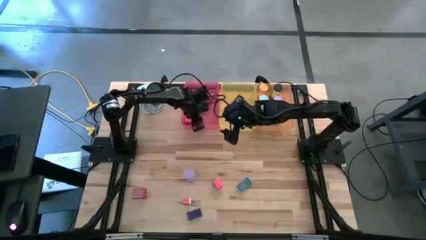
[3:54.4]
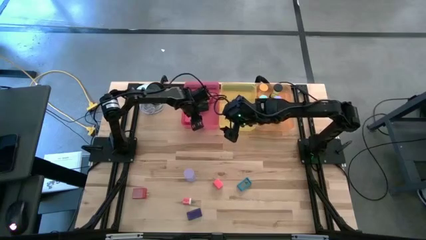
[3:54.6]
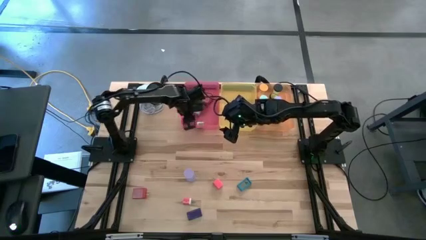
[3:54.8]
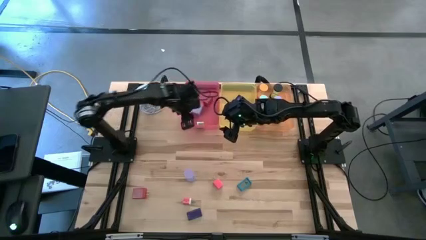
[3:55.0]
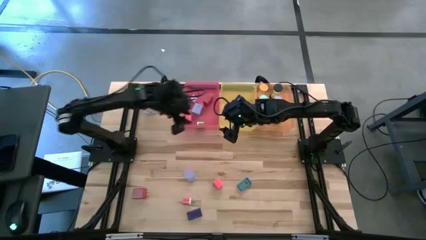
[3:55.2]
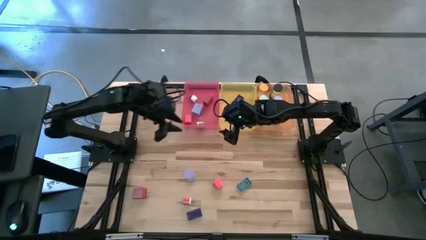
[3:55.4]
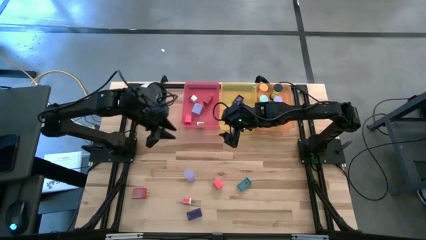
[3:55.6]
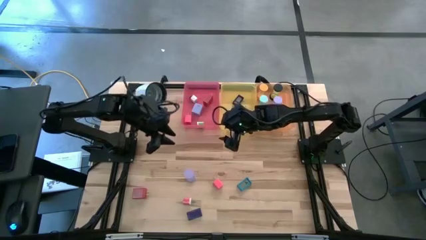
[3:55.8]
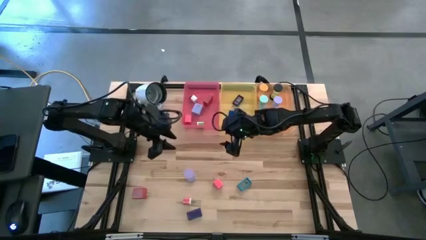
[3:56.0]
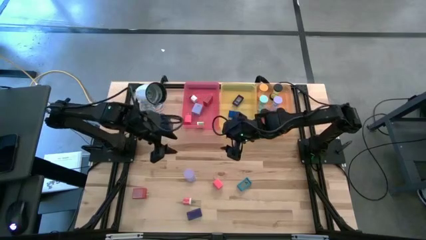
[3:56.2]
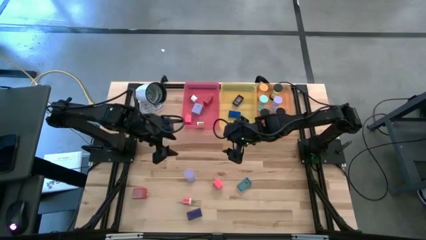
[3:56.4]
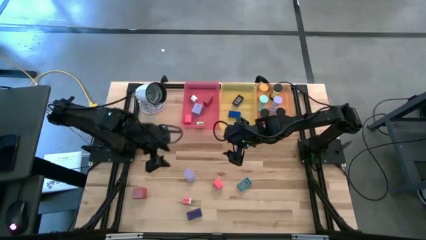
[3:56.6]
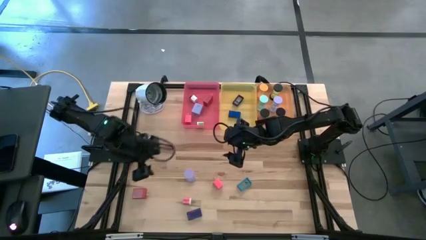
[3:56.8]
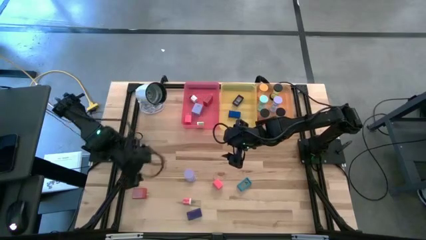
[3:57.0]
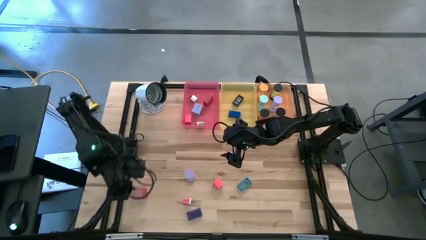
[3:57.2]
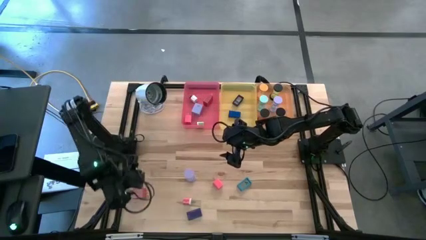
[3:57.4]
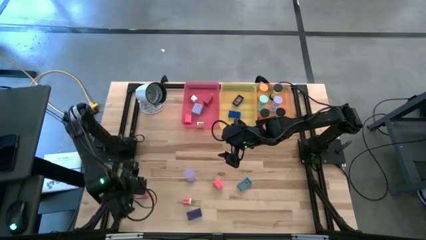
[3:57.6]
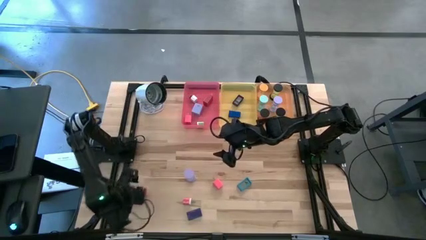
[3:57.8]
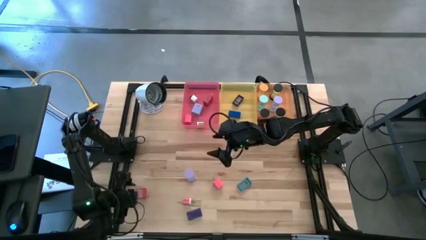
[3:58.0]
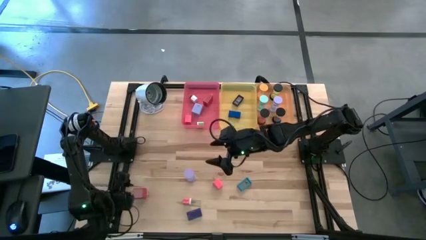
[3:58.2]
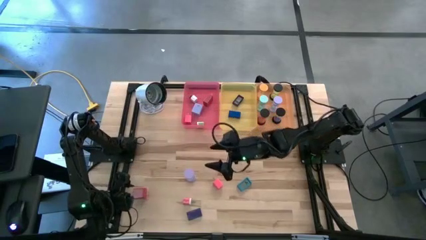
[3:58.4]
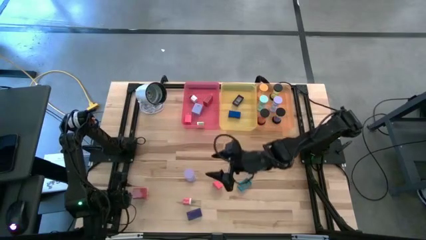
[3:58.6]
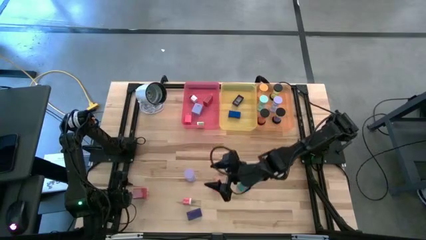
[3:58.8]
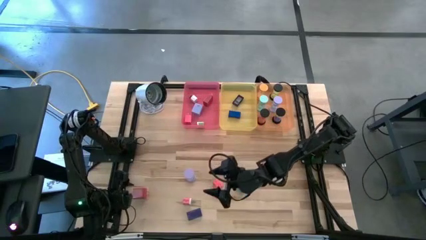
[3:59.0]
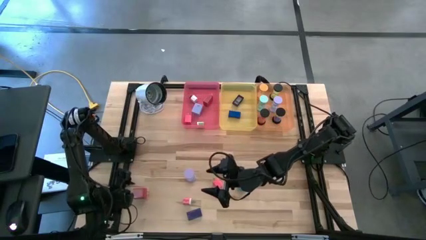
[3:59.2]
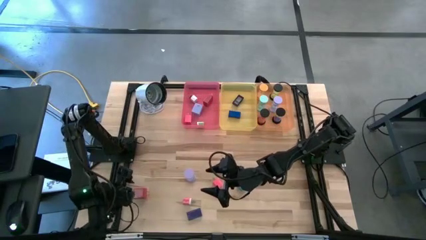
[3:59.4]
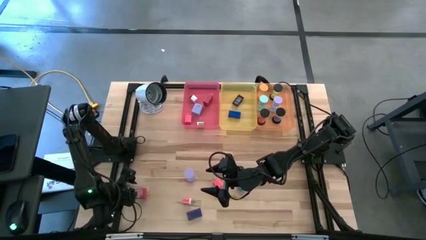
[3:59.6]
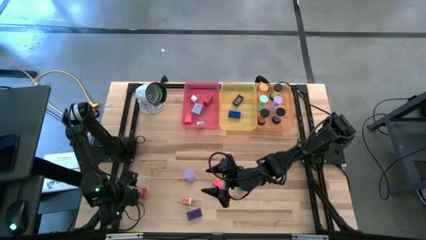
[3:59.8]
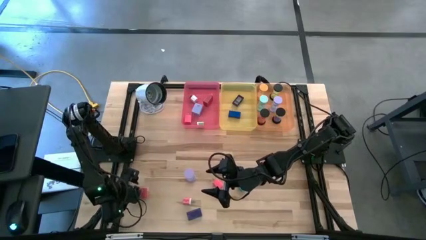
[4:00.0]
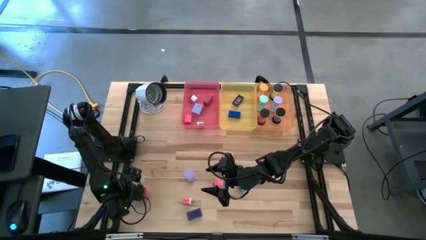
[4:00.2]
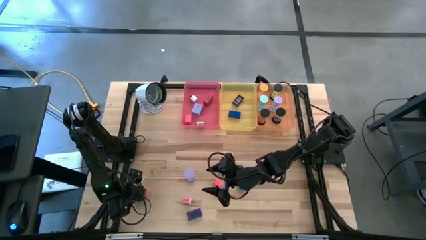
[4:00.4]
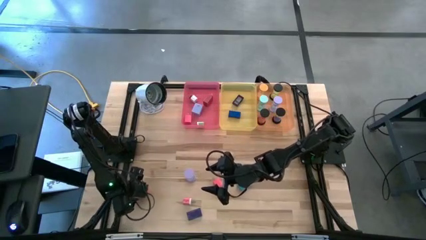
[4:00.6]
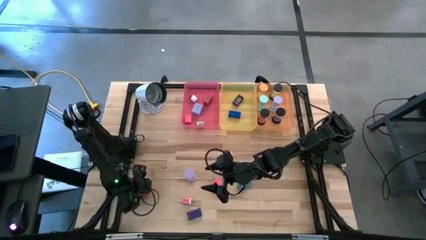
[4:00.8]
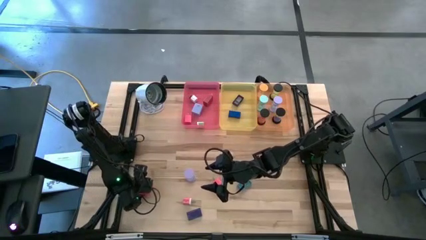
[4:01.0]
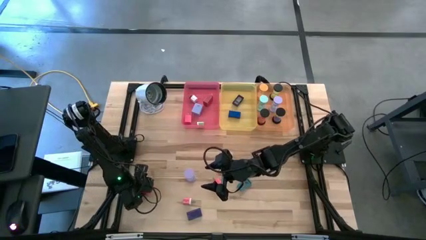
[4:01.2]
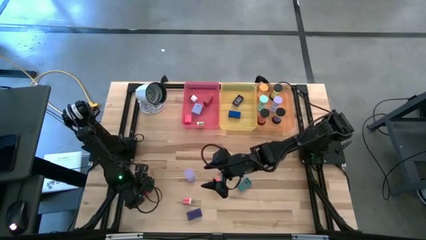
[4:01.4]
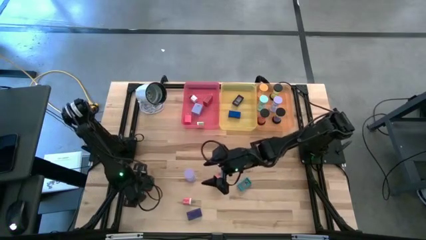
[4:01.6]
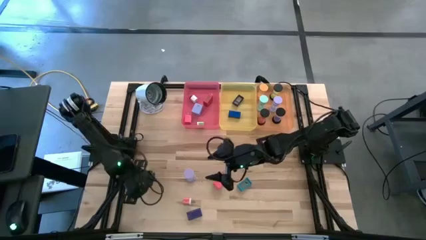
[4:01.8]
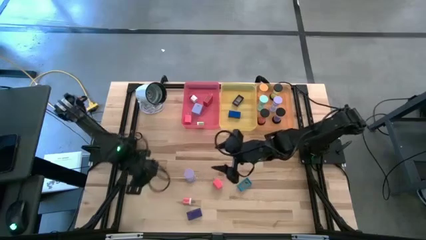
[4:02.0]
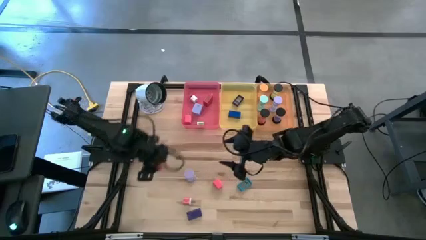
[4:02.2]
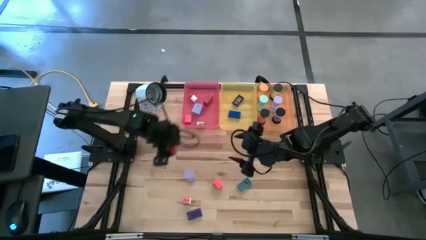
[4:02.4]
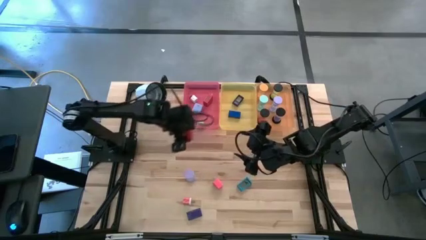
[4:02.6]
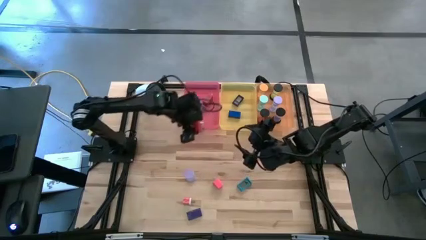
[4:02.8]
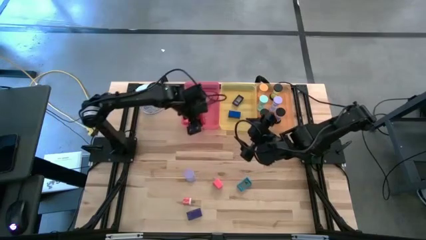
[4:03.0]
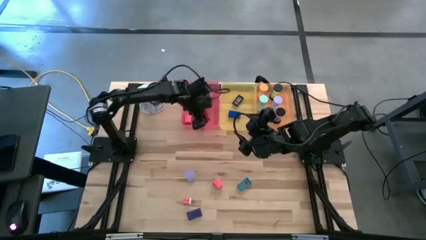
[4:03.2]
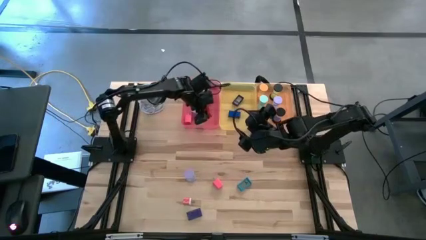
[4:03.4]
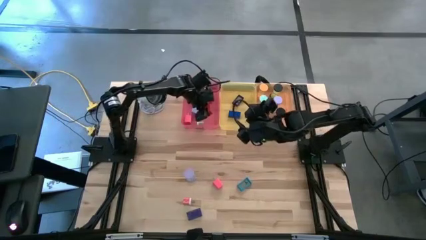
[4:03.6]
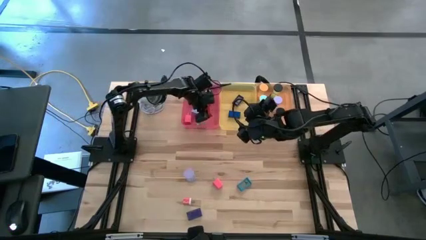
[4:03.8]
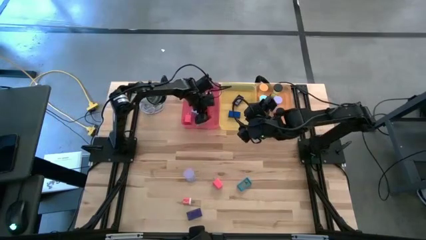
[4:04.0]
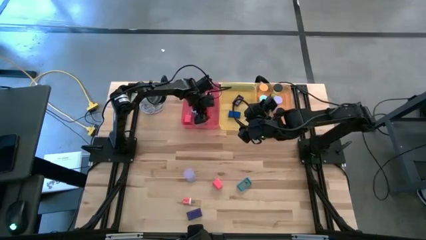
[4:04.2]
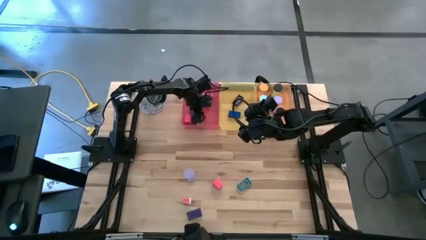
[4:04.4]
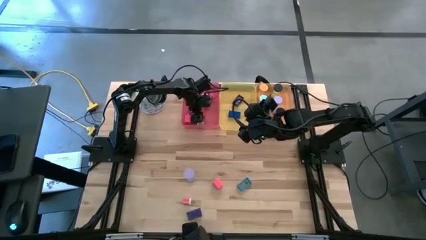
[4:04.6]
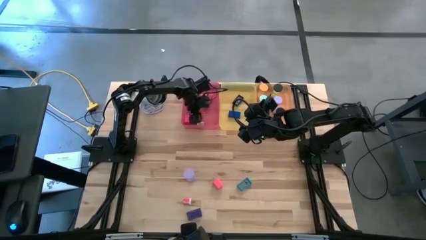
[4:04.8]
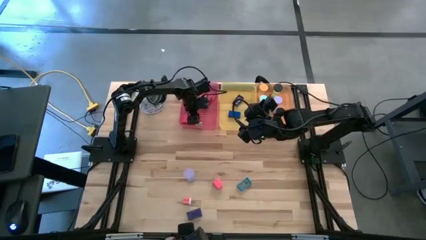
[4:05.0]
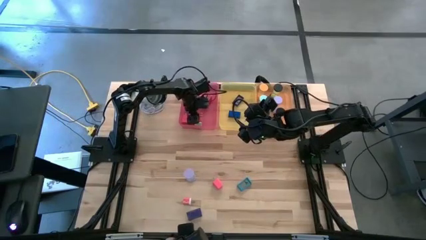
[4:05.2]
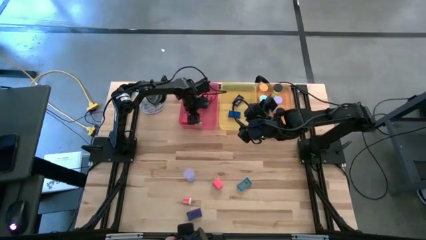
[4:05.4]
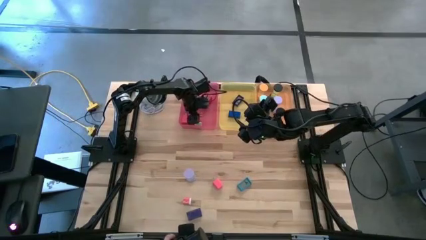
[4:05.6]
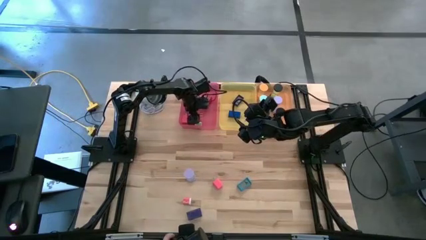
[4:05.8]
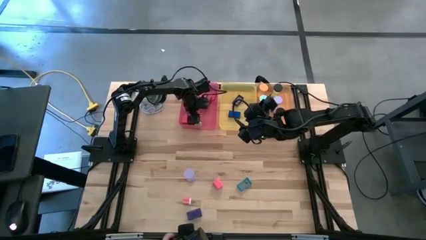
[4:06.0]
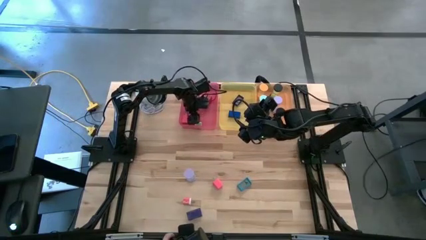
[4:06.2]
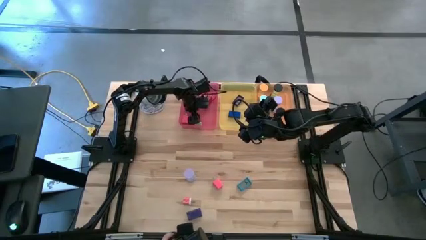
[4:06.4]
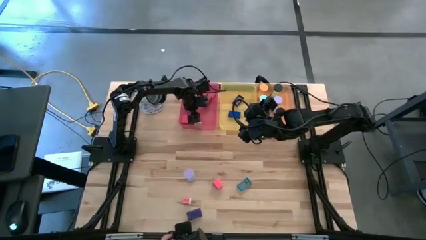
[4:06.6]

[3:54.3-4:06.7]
Task: Pick & Place Office items
Put the red charger adapter into the red bin

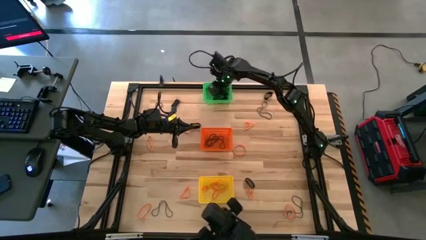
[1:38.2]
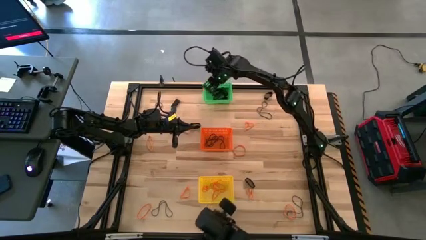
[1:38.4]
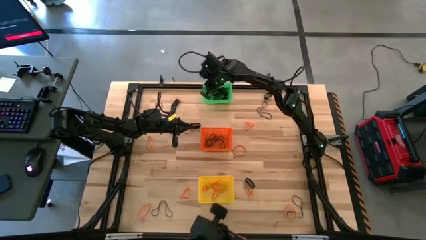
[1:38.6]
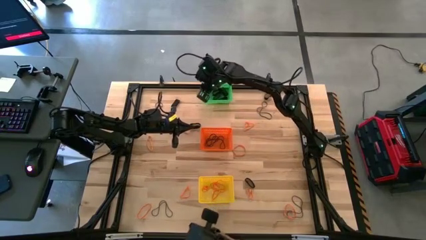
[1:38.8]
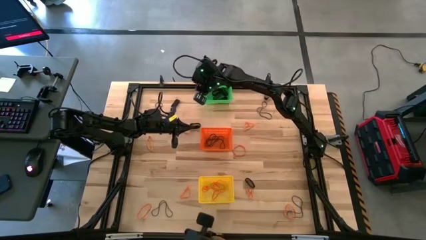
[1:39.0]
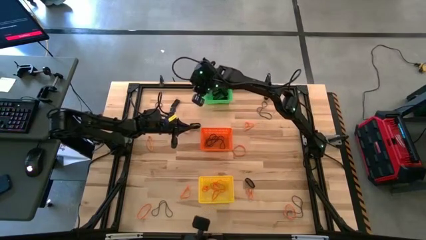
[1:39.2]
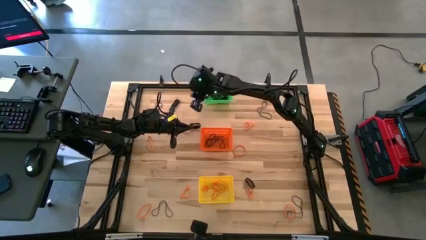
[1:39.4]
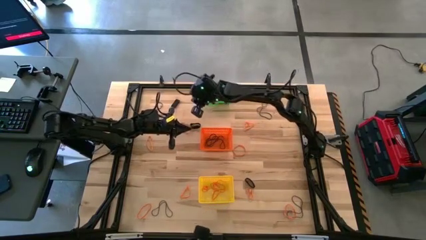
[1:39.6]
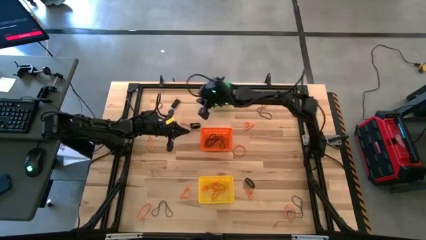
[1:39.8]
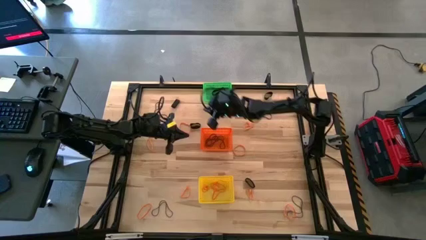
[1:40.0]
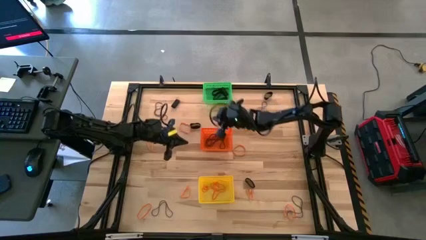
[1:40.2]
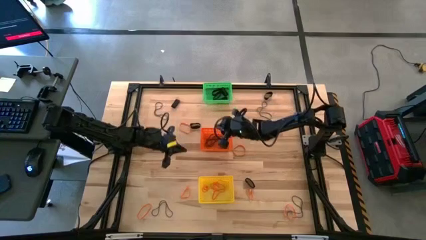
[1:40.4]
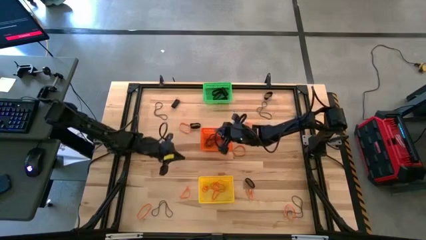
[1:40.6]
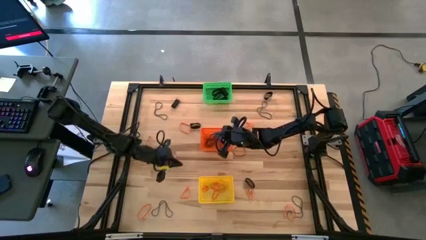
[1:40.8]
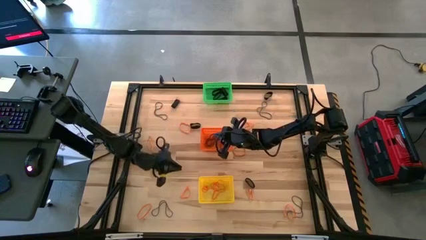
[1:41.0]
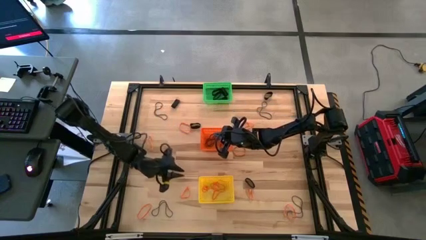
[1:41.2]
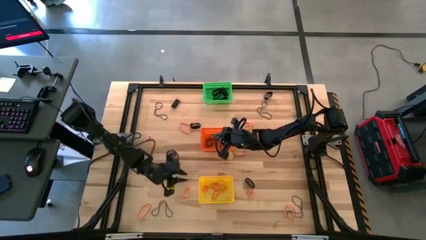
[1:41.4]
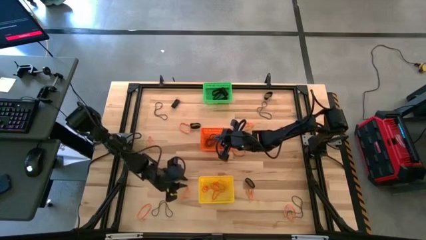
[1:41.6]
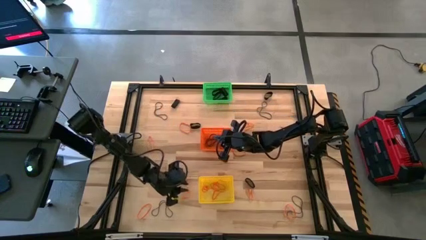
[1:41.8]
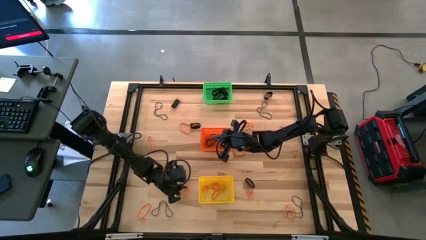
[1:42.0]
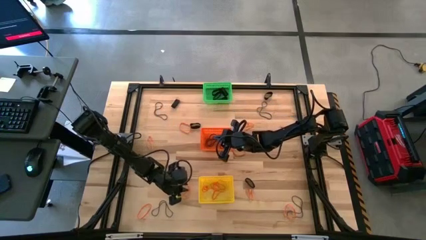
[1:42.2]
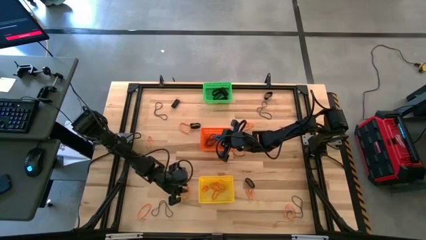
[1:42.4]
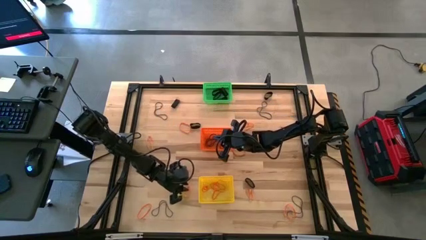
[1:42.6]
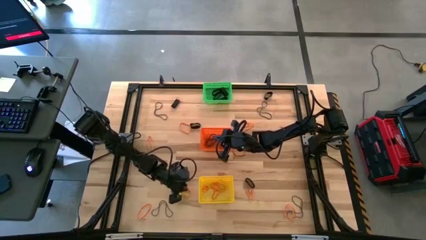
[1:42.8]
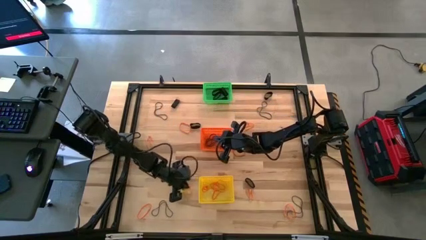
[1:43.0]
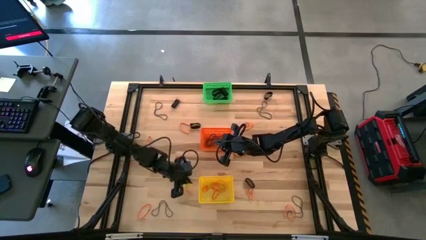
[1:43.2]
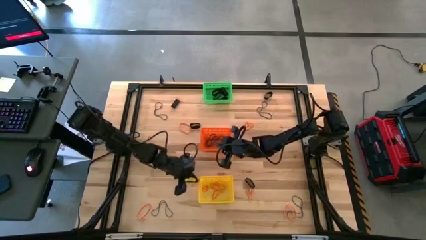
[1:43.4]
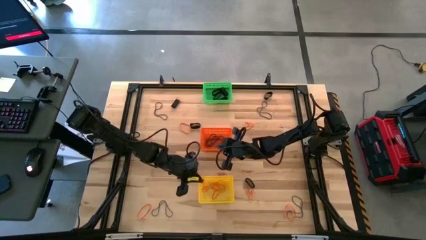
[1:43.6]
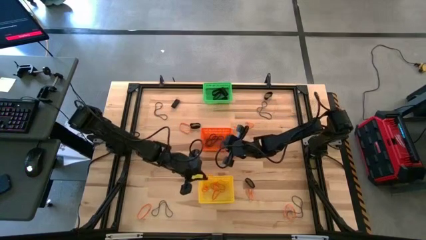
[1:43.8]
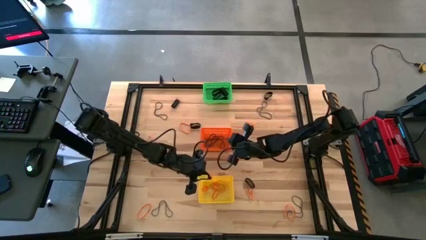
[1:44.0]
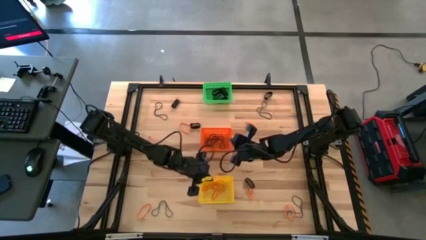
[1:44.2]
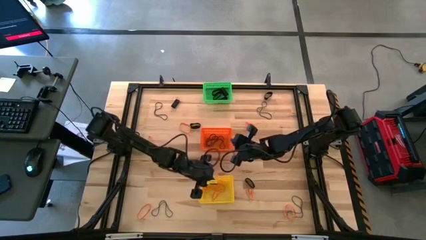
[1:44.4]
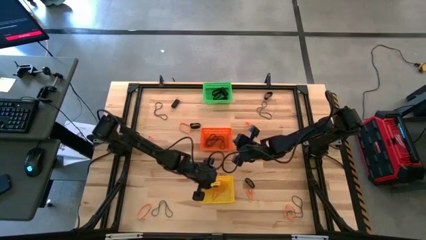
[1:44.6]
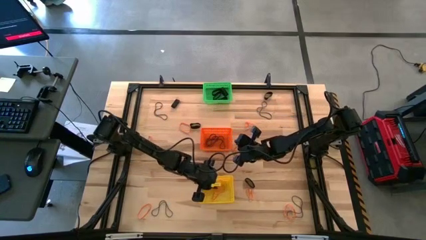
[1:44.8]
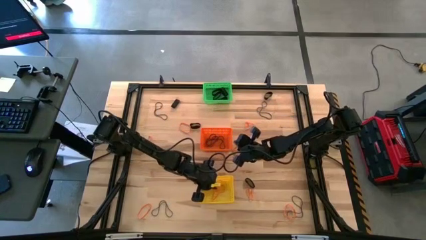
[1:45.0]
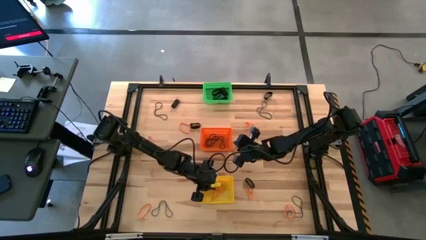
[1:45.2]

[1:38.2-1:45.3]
Task: Sort rubber bands into baskets
Put the orange rubber band into the yellow bin
